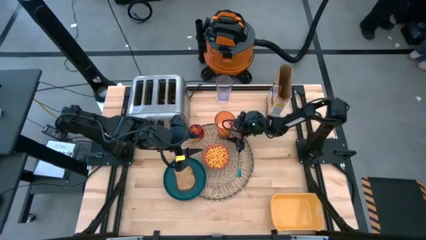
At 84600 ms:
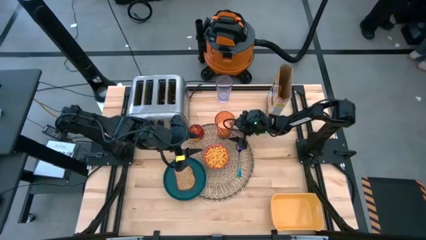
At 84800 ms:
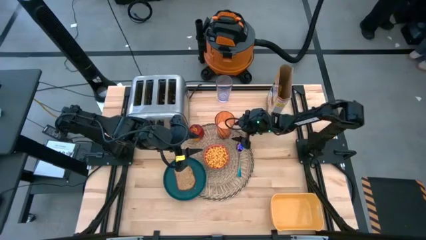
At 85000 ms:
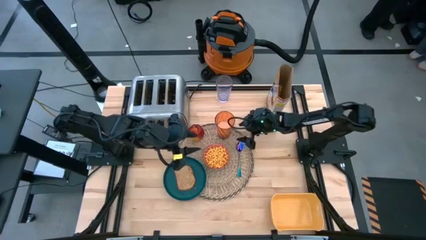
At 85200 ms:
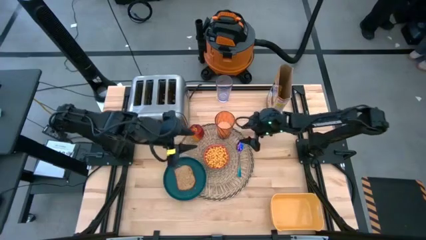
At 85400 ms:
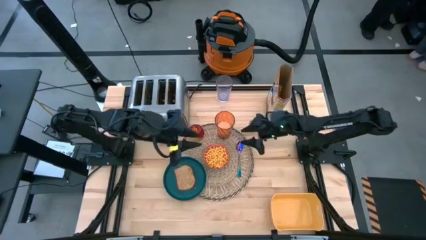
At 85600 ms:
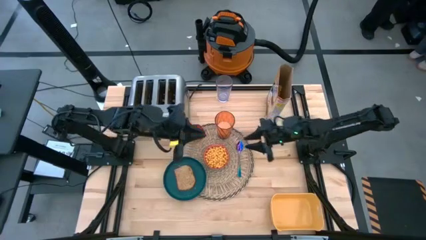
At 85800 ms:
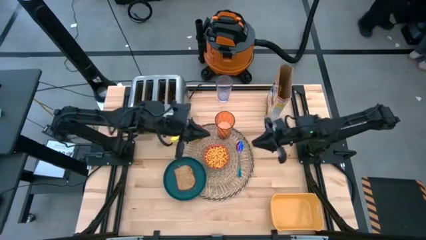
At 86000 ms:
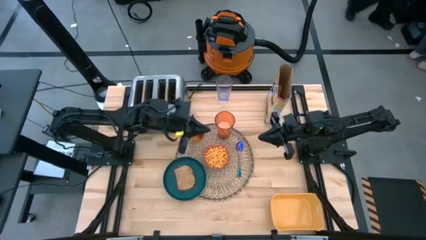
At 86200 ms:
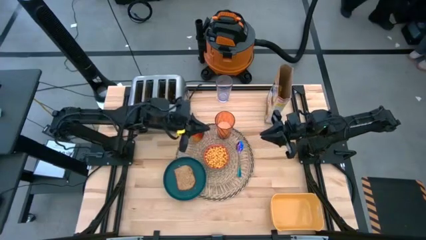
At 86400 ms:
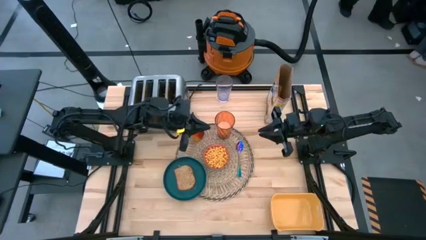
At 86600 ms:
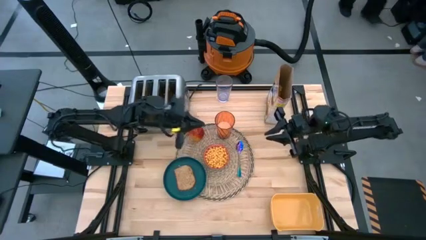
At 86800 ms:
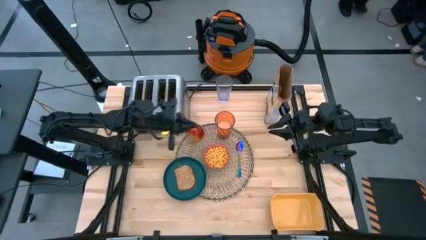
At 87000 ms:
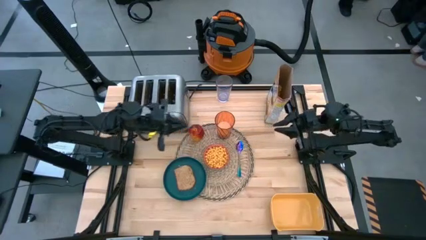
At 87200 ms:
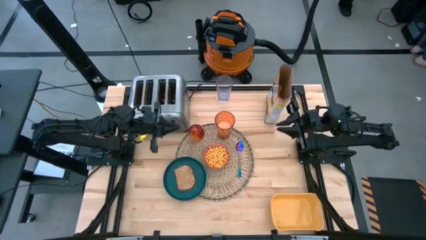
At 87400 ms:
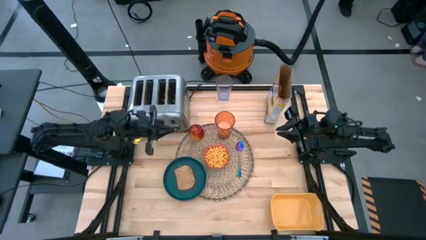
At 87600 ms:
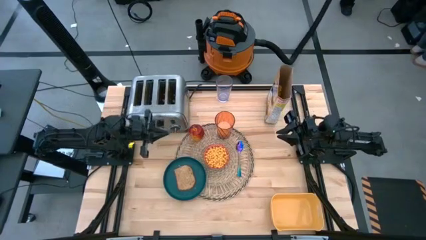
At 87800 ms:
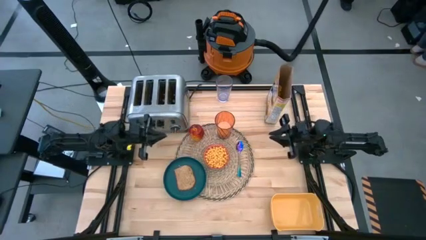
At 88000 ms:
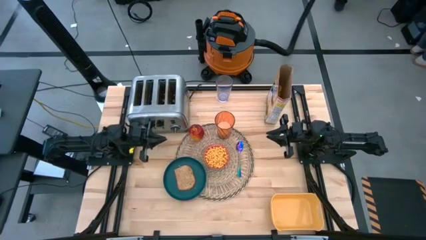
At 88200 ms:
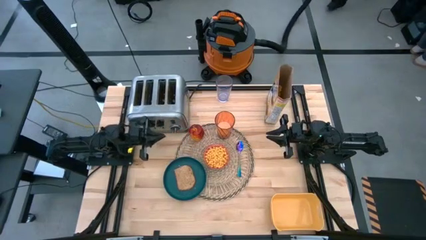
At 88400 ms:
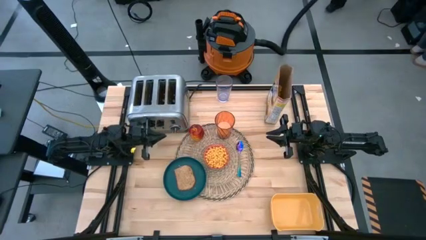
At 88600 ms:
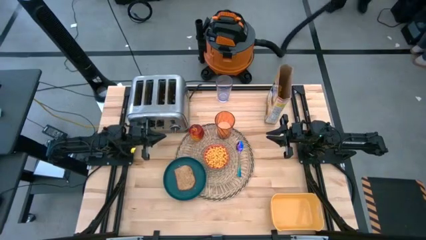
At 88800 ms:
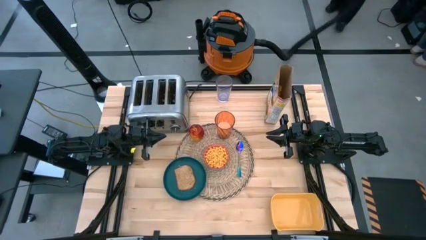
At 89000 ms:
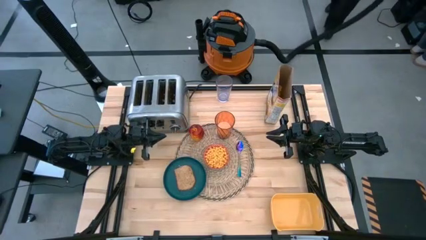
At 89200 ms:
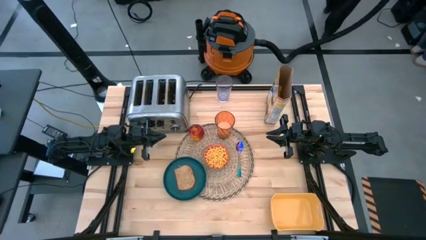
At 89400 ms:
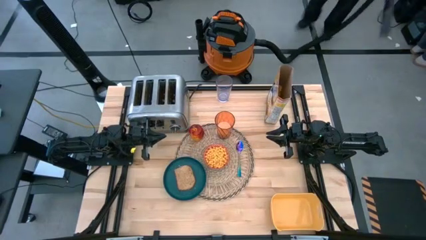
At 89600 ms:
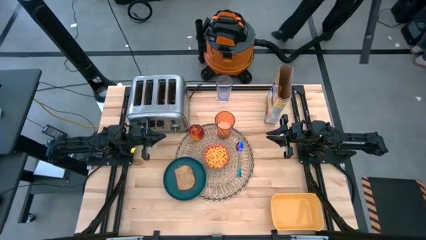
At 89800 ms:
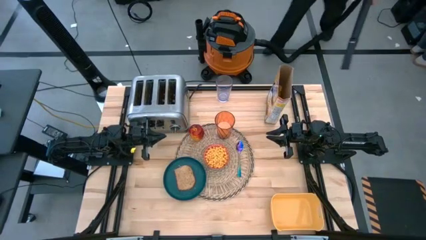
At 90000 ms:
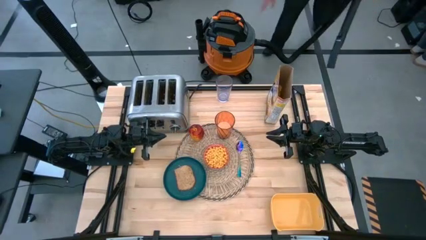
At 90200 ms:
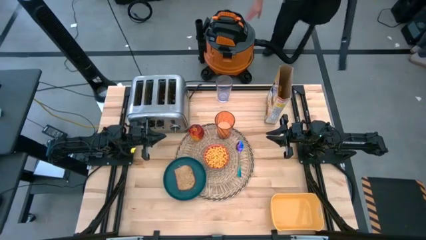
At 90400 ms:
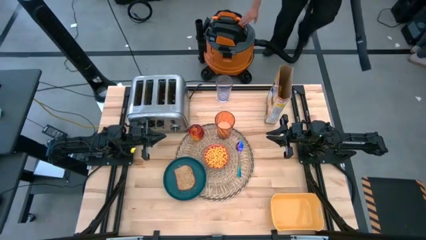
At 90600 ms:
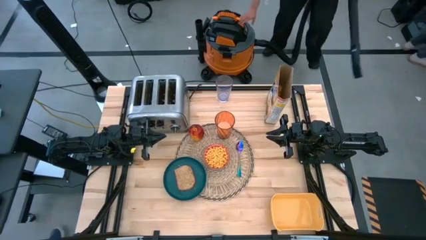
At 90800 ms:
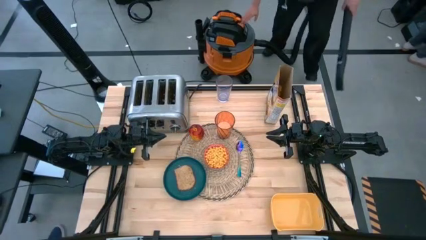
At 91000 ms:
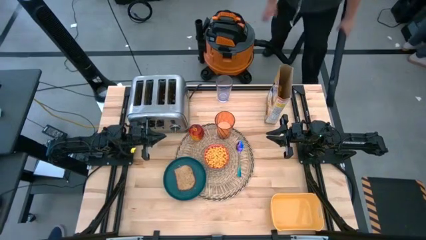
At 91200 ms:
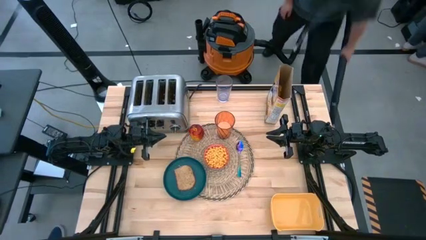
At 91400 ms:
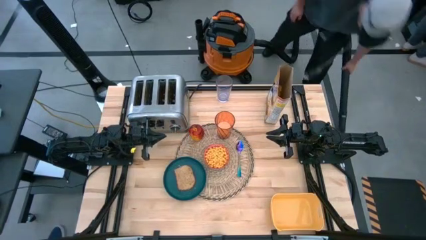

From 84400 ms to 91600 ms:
Task: Arrange a breakfast setting
Return to Home Position

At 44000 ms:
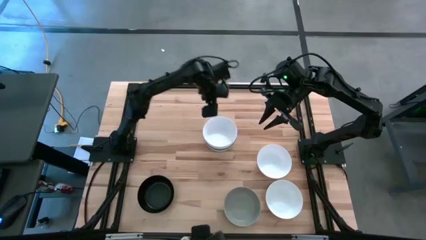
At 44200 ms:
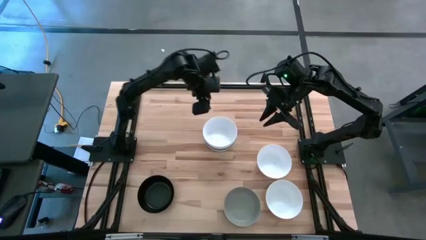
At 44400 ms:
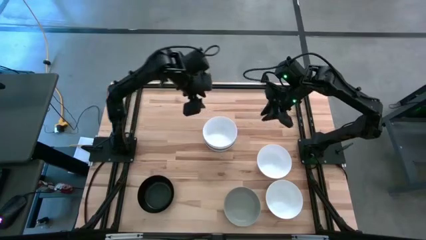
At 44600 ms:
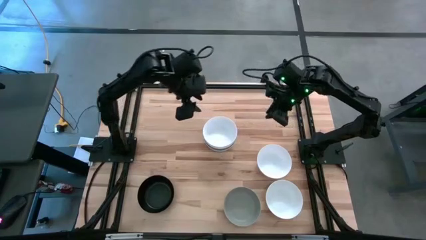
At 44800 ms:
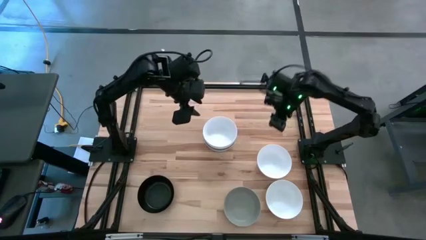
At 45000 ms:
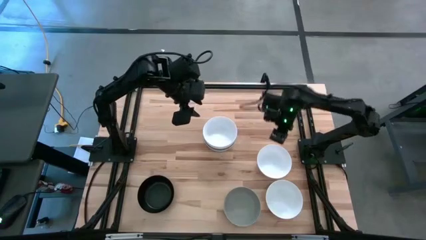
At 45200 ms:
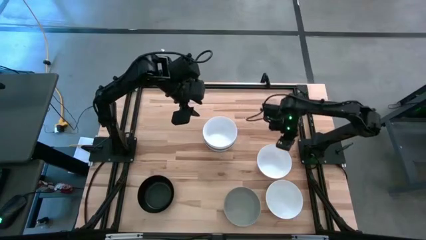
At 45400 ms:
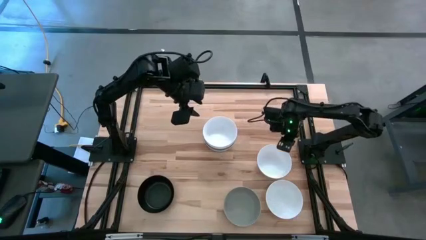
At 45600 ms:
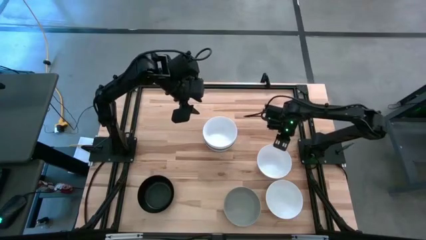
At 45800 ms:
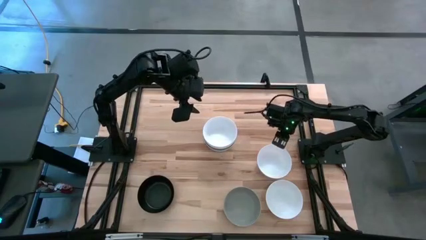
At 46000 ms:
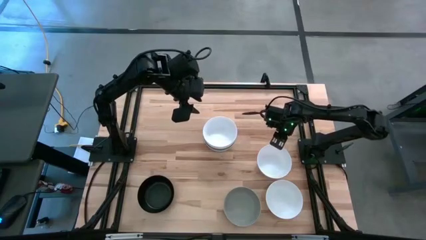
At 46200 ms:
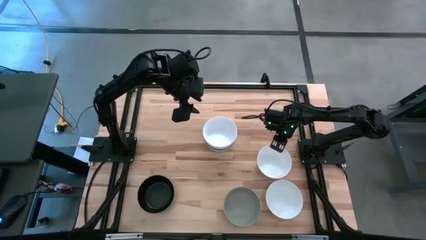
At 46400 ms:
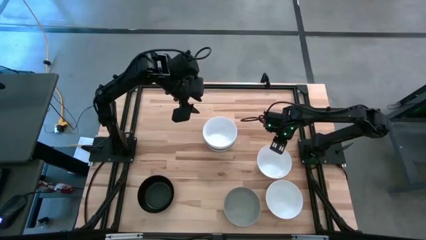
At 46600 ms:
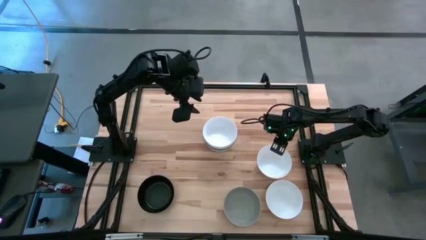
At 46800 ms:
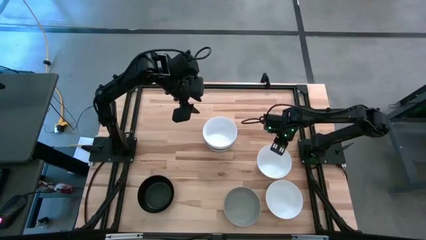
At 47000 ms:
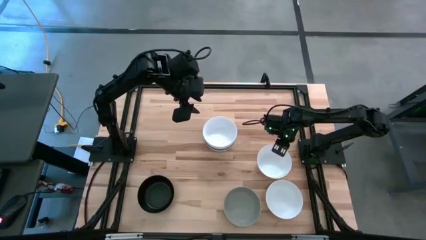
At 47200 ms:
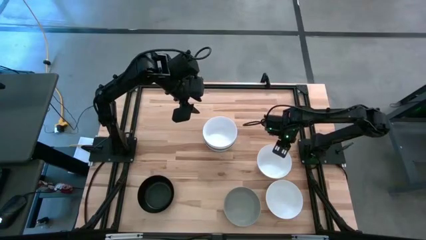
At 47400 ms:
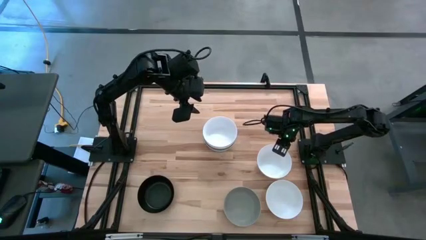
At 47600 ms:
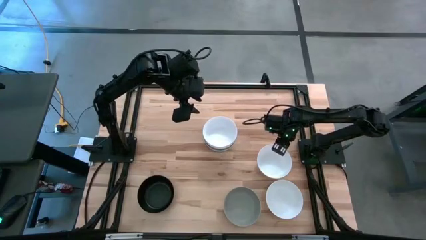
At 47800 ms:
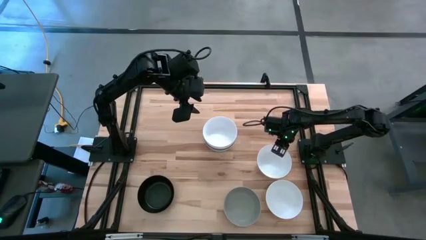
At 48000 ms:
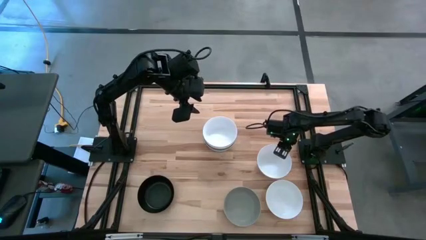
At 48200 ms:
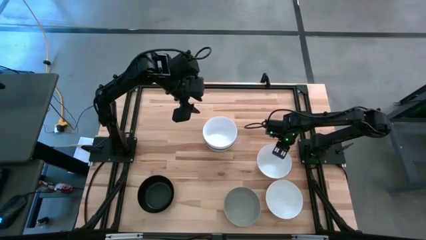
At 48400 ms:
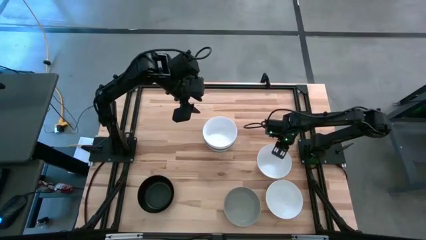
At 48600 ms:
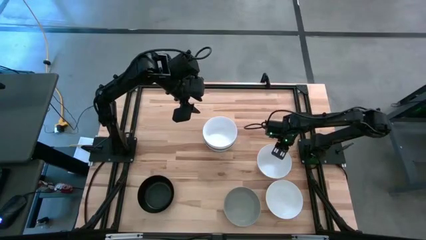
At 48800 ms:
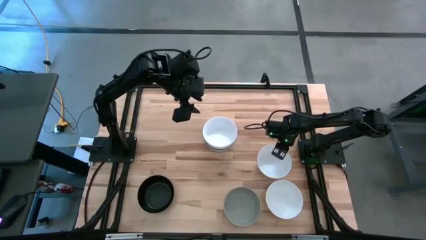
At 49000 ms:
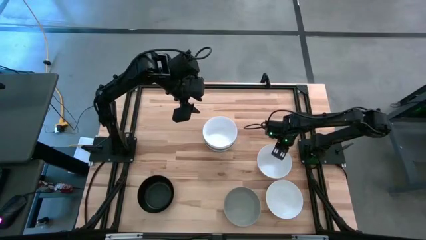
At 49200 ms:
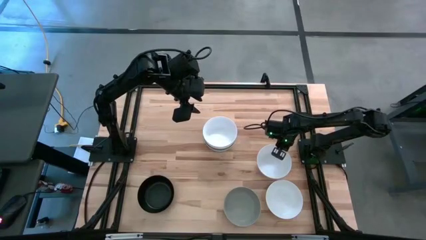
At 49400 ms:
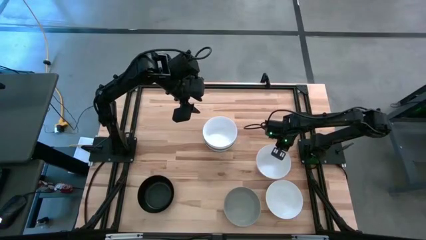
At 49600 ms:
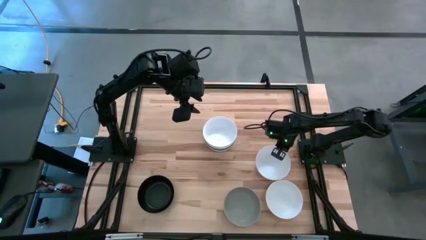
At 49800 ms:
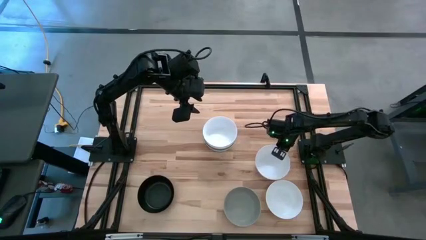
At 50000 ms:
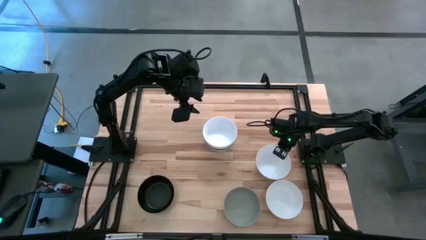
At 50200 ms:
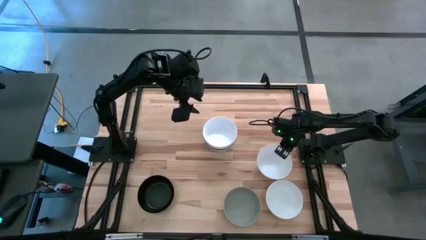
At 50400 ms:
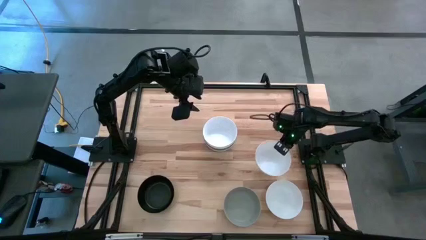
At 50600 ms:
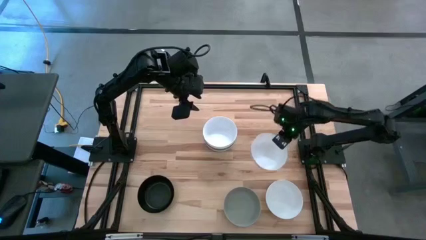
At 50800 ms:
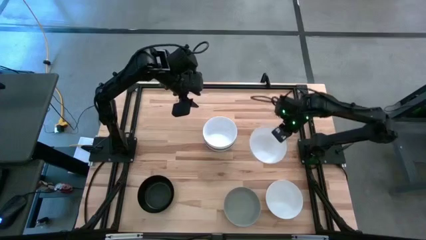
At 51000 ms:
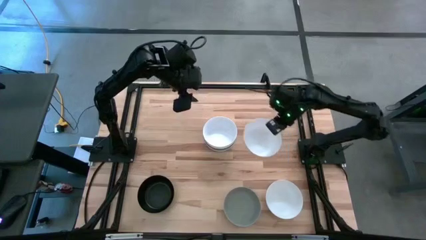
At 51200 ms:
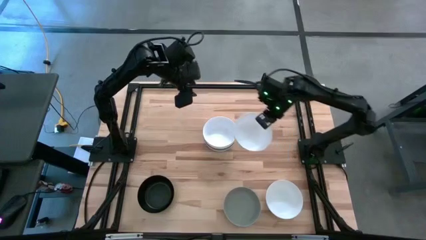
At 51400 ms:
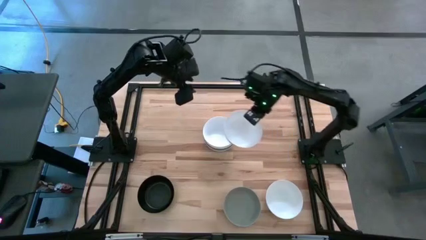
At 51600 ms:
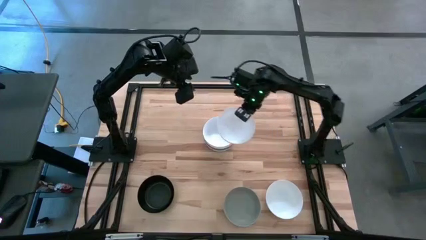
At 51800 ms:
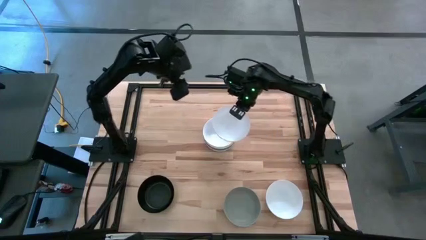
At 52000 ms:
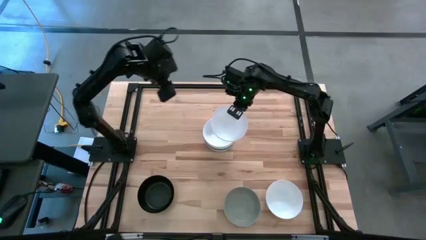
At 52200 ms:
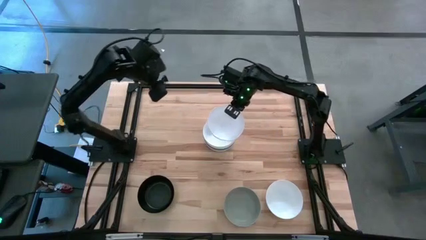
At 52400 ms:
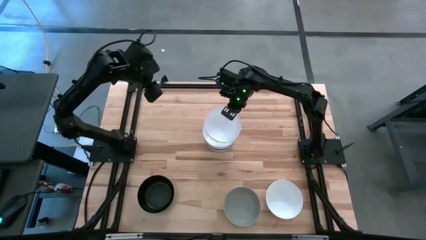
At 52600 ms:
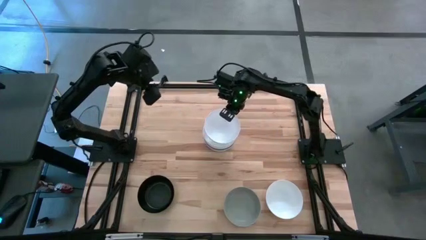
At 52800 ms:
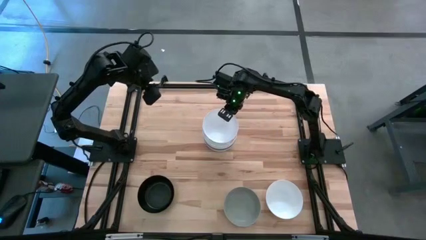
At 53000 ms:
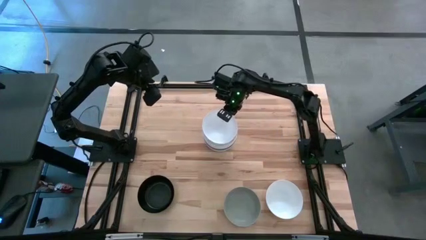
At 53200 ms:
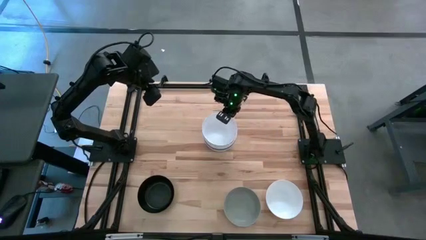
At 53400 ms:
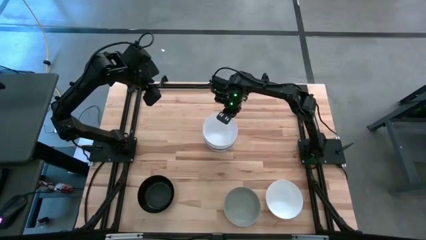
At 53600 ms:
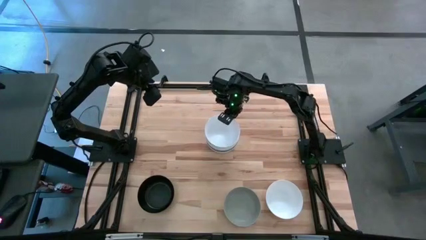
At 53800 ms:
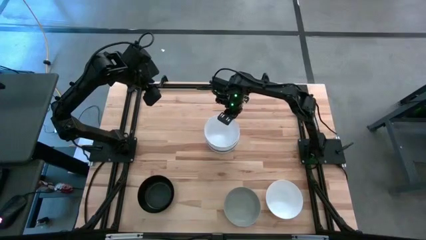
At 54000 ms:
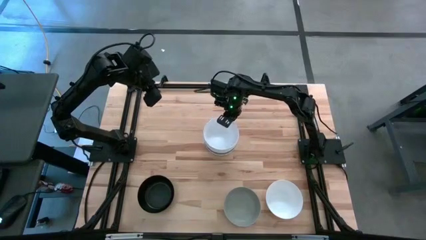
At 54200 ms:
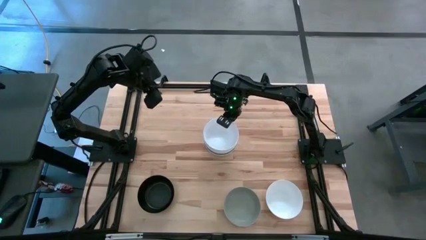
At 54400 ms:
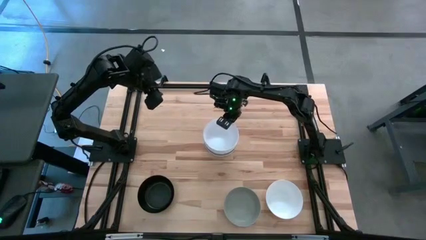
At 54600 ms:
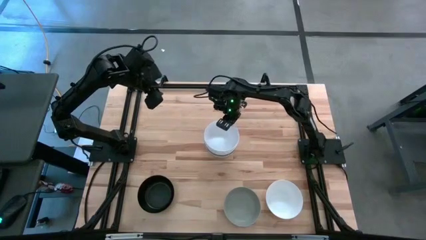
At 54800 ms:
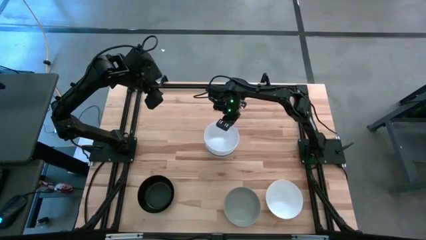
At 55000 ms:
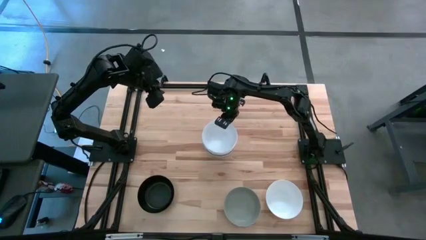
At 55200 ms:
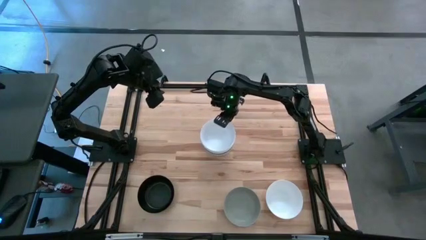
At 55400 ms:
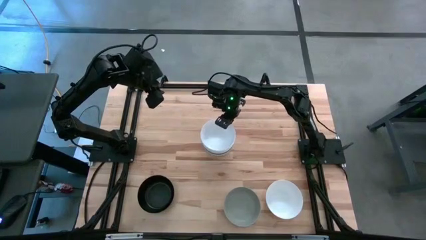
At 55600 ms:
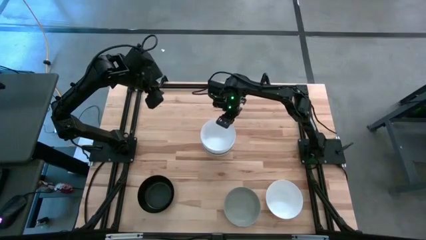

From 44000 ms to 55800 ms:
Task: Nest bowls inside each other
Stack the white bowl on top of the white bowl
